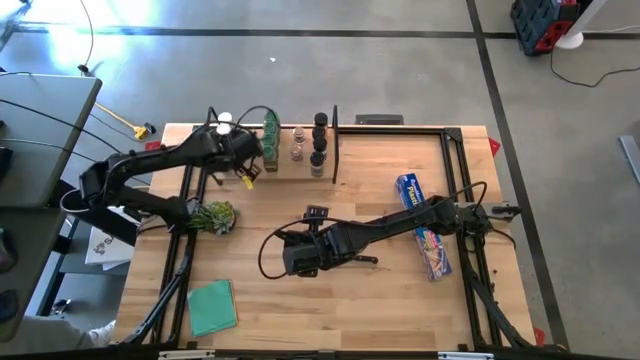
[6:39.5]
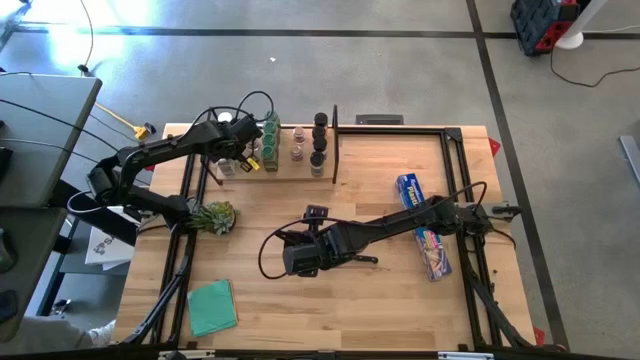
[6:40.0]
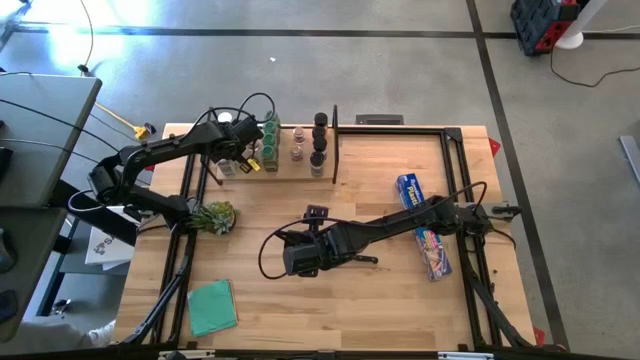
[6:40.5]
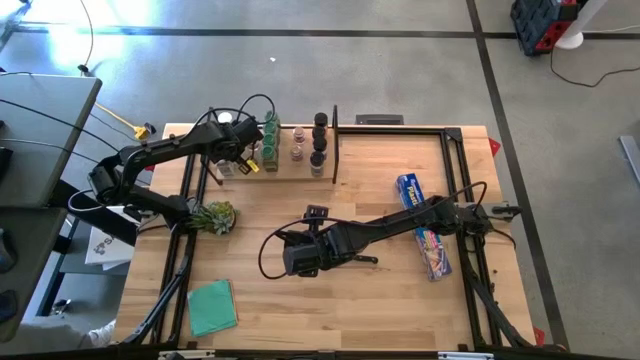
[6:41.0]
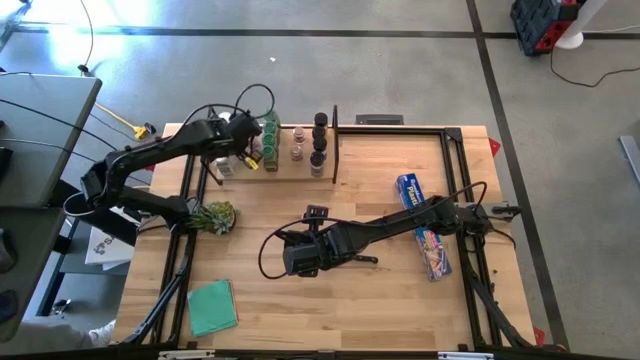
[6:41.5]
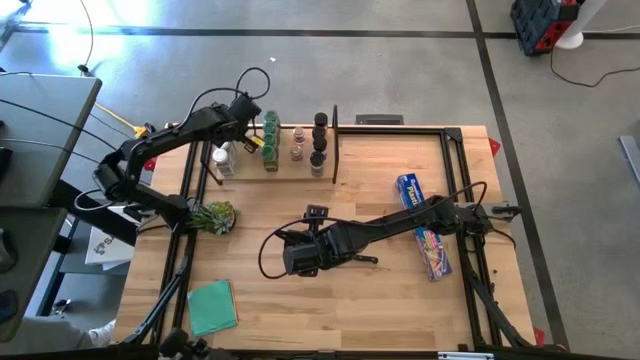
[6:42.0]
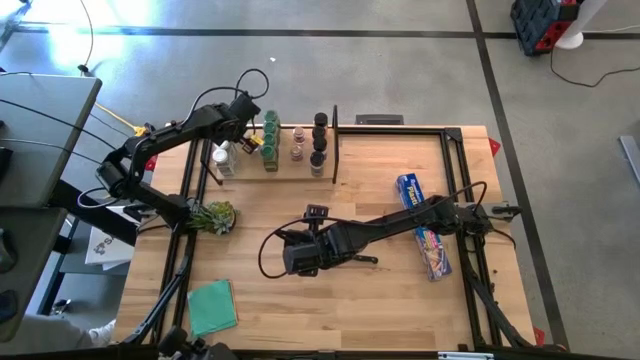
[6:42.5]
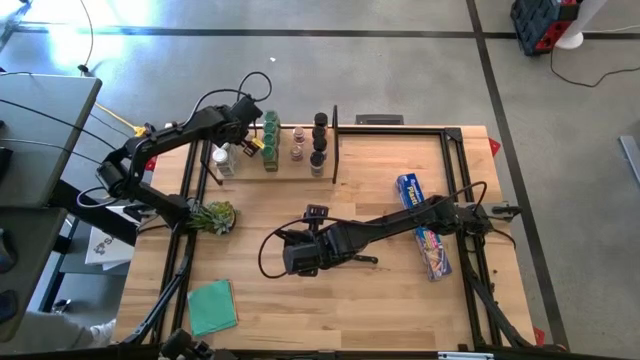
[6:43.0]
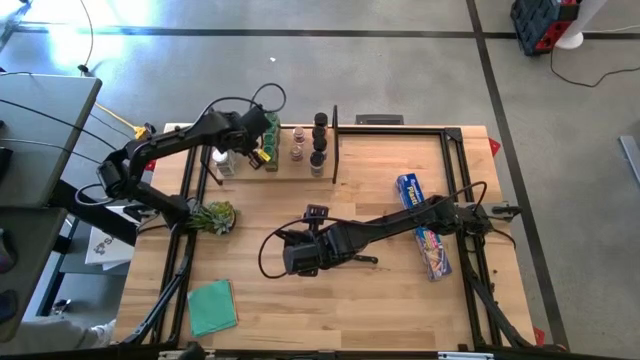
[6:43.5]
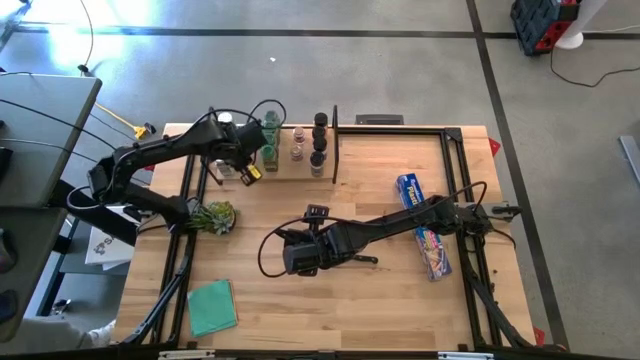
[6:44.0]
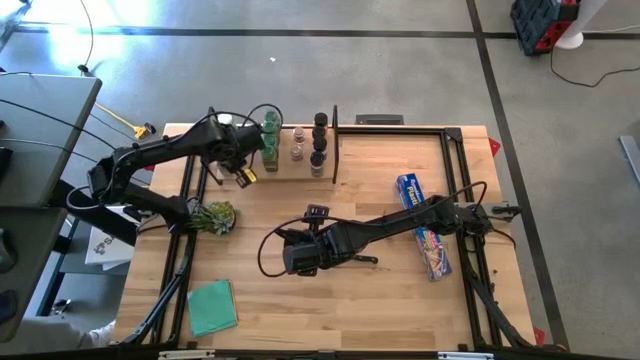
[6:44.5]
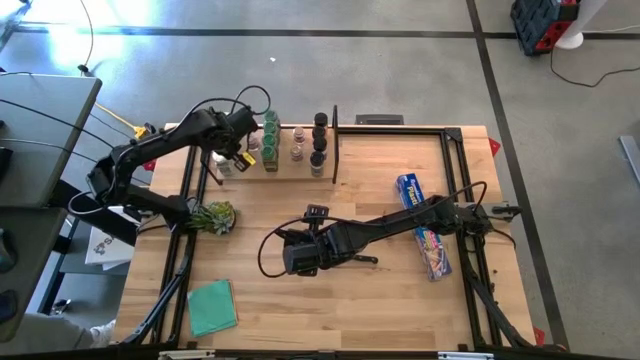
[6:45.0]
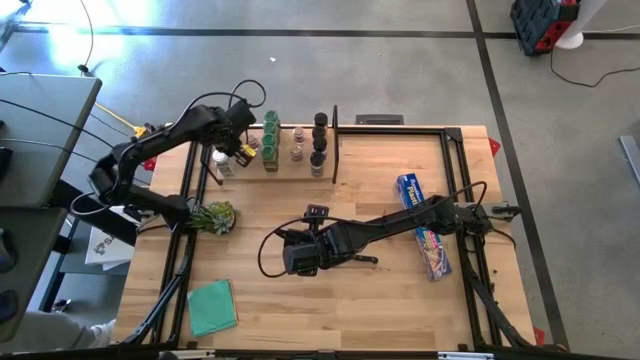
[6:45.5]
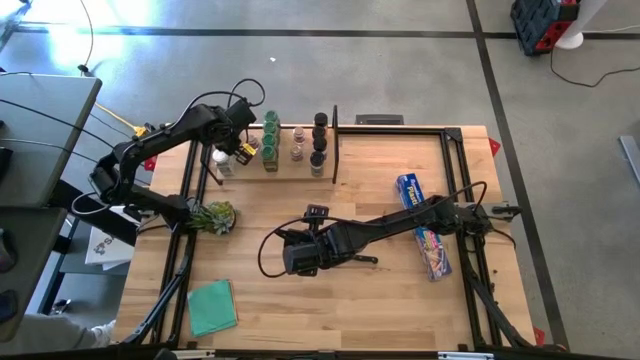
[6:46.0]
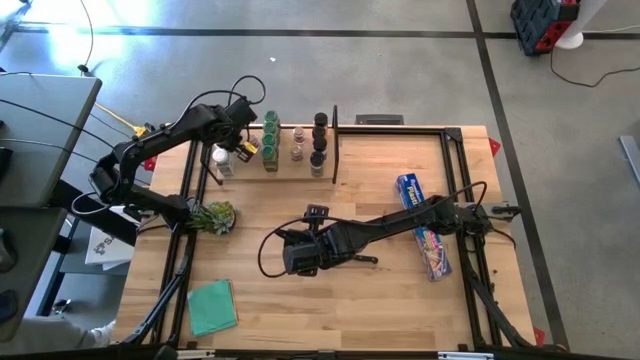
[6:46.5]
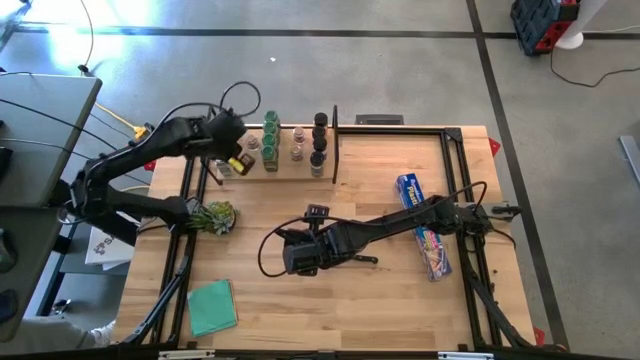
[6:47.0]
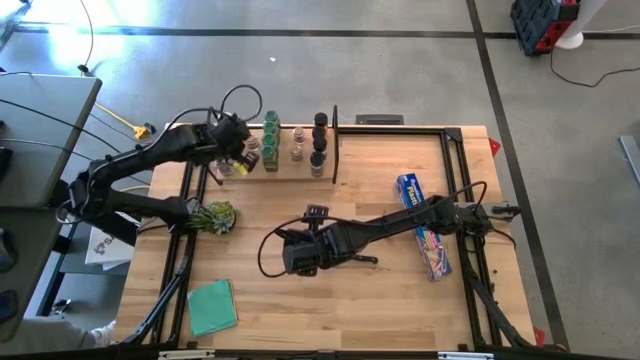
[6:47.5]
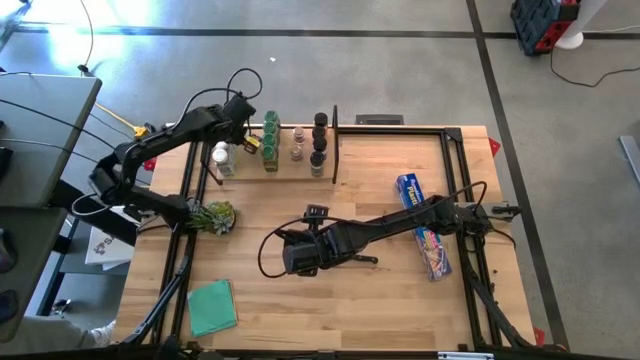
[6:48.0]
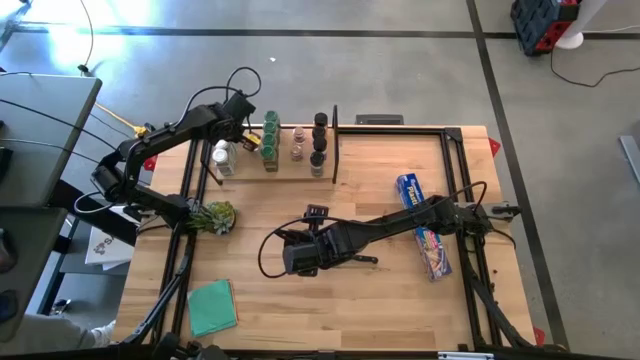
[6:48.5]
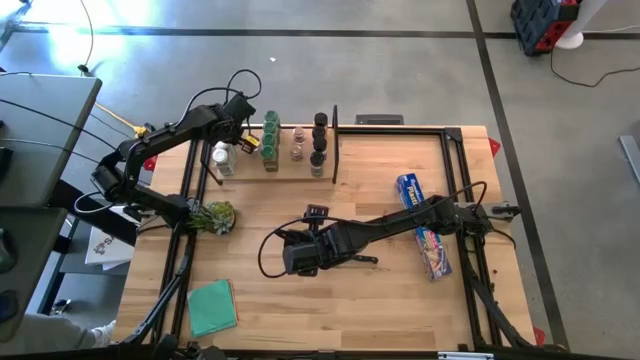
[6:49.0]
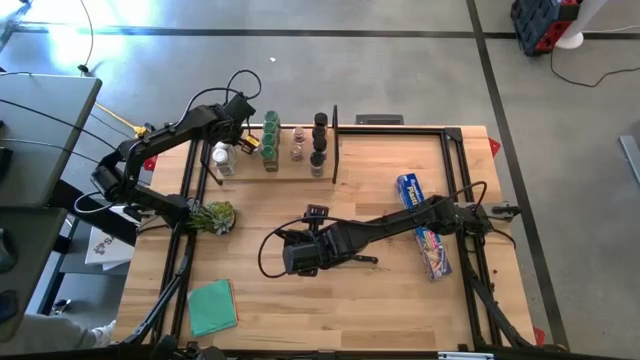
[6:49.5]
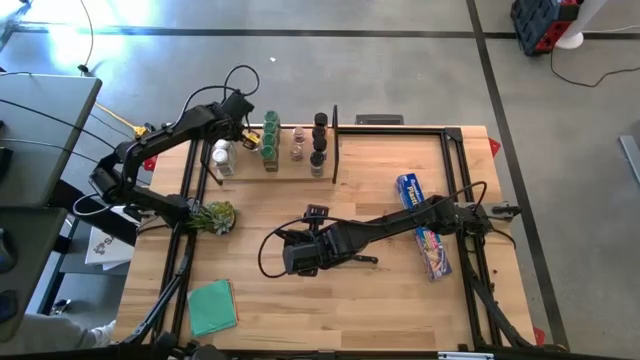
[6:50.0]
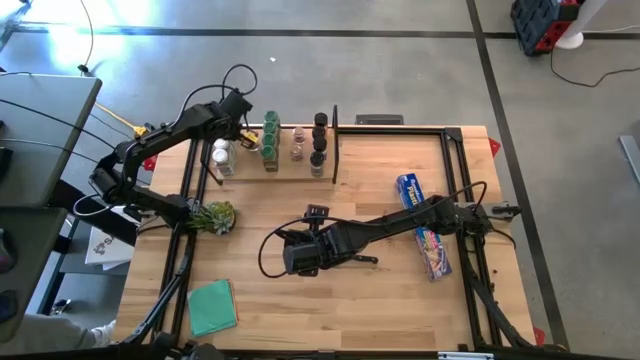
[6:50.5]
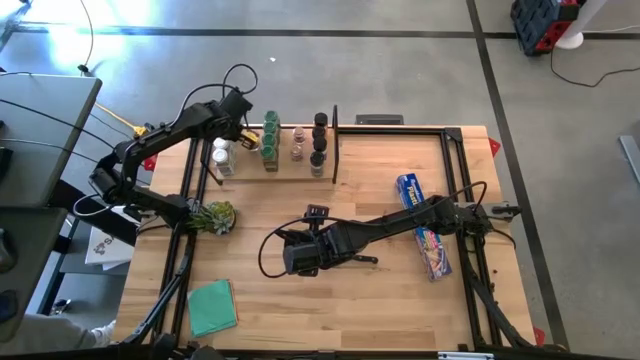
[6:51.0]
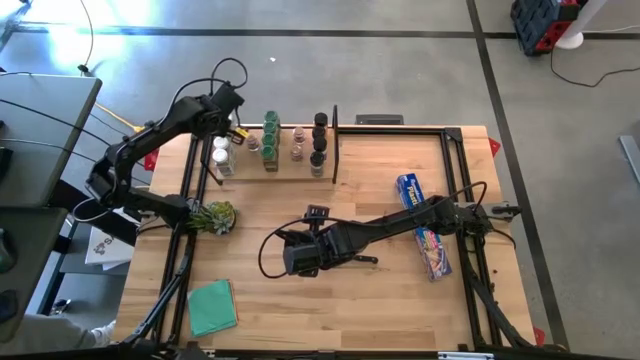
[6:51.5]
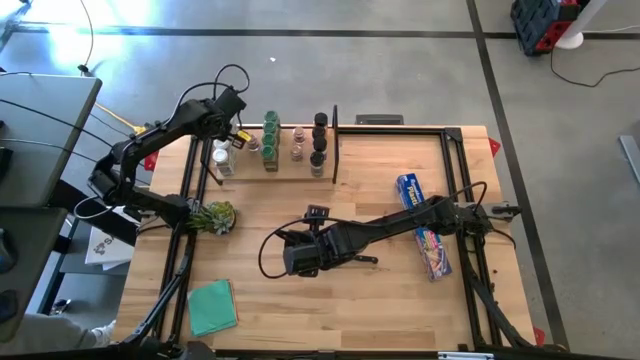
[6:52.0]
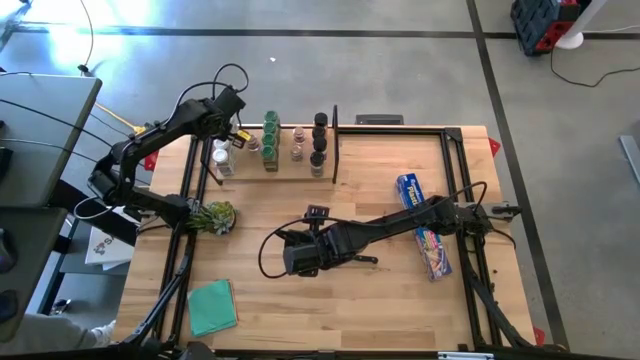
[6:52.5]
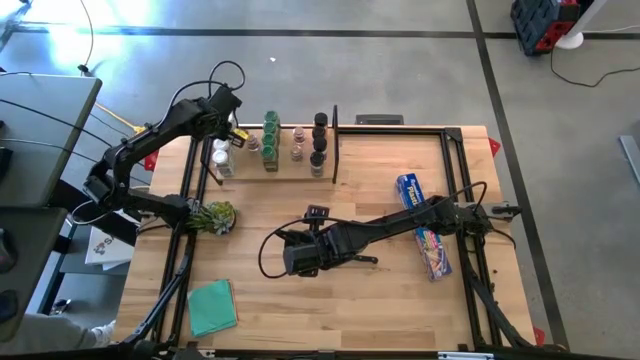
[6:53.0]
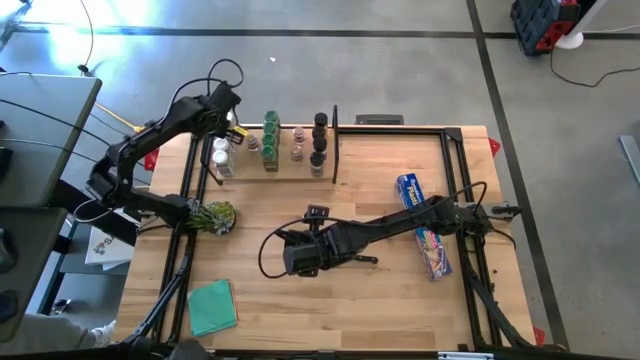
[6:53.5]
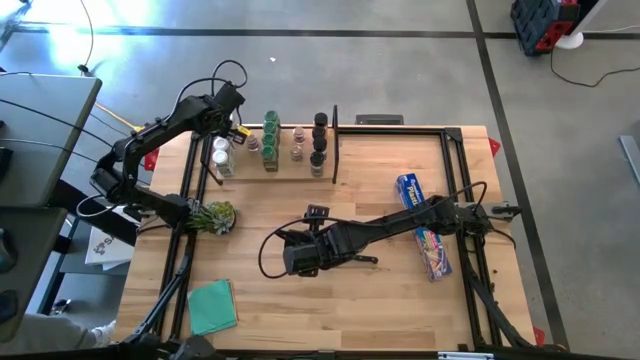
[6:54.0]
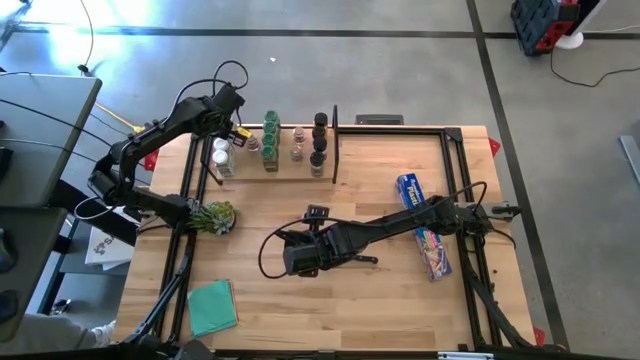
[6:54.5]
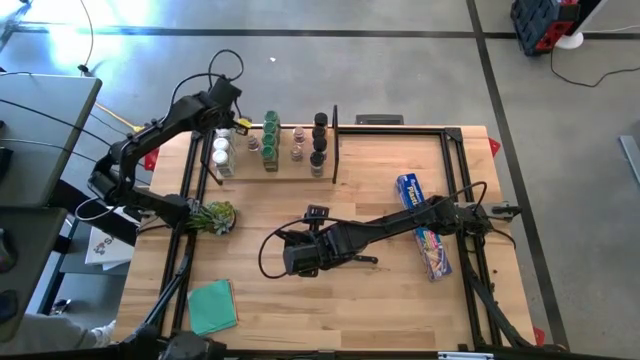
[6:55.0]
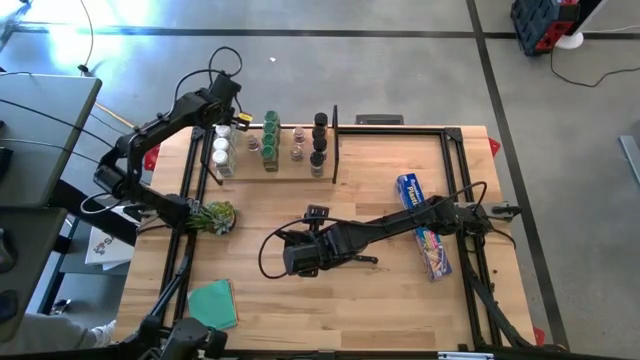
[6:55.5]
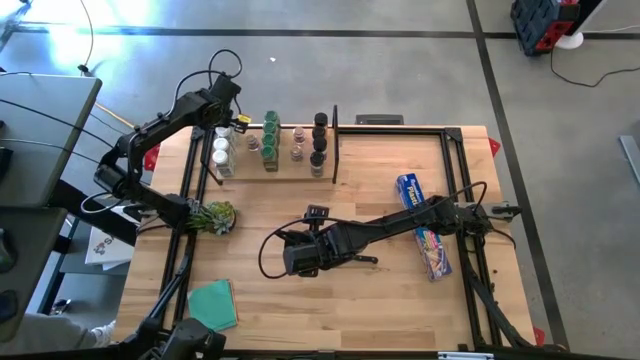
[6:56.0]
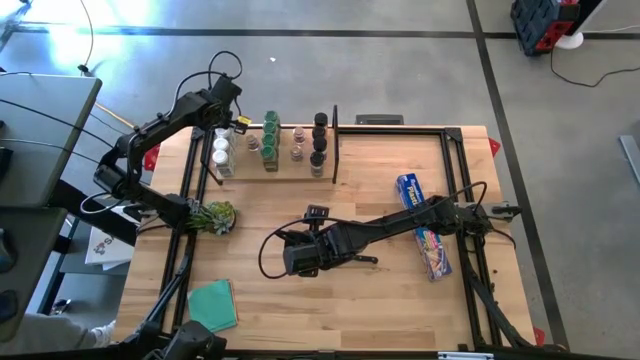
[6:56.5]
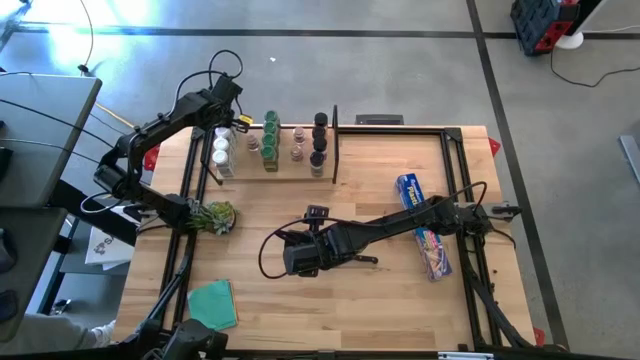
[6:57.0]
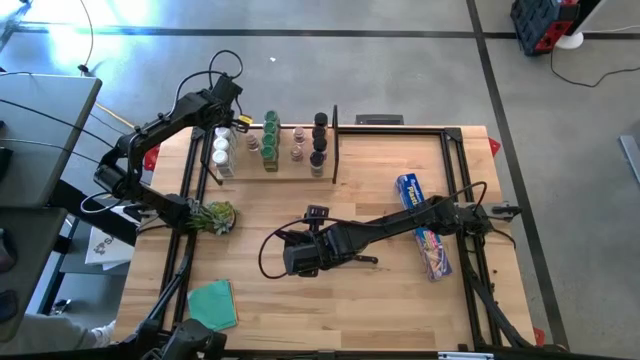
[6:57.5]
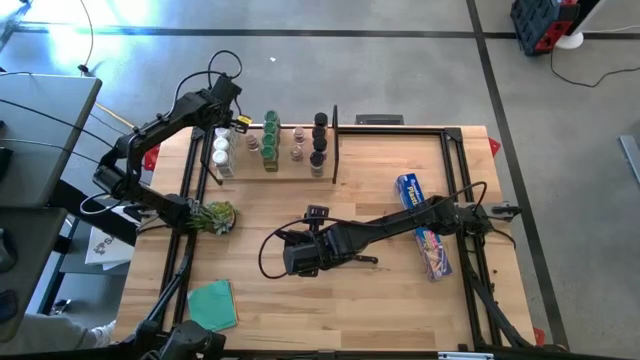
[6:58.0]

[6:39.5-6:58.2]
Task: Shelf spices
Adjust the white lid seasoning bottles on the shelf
